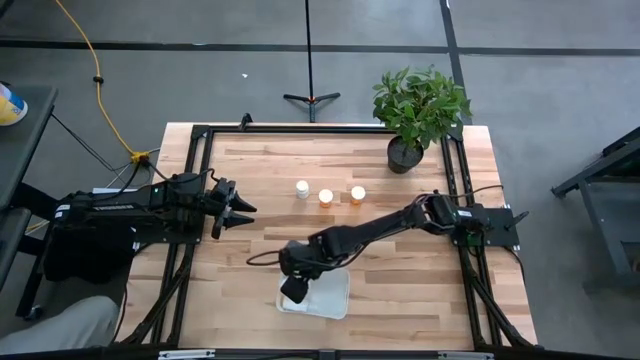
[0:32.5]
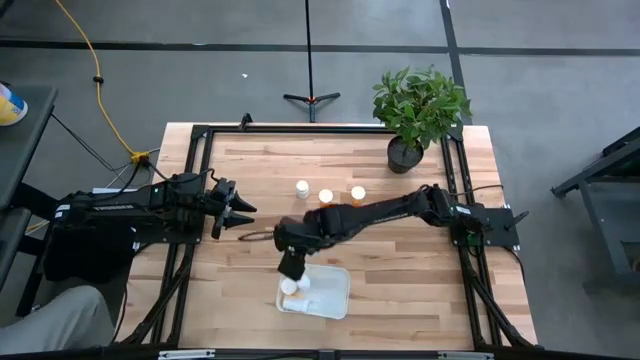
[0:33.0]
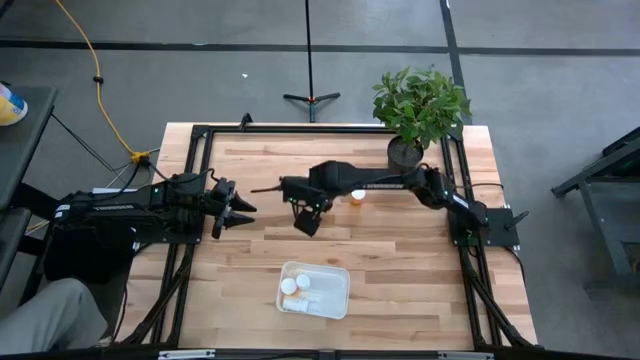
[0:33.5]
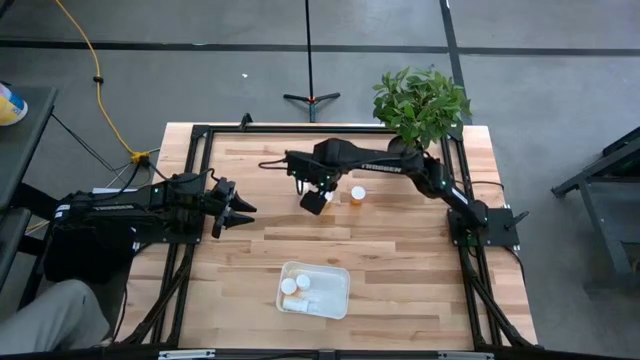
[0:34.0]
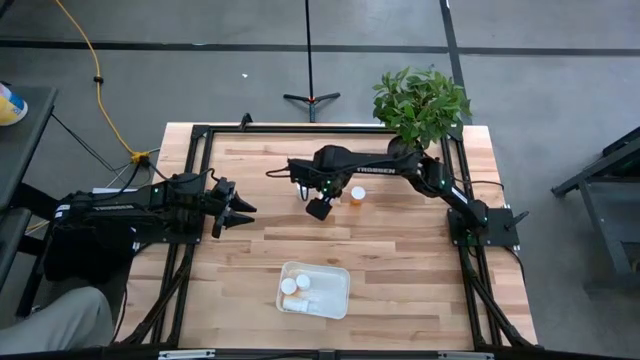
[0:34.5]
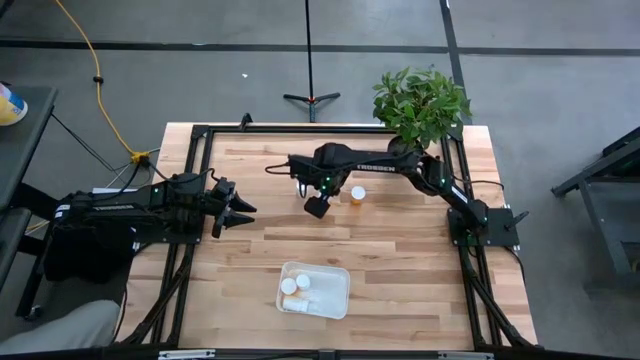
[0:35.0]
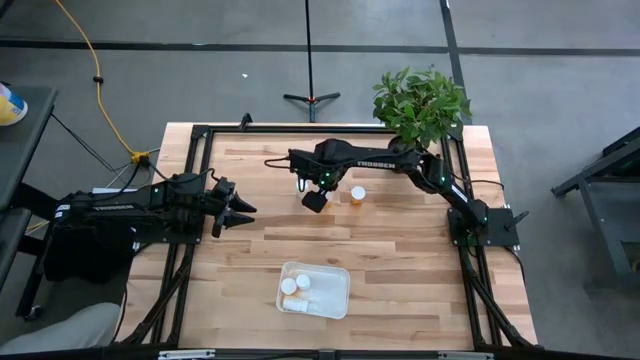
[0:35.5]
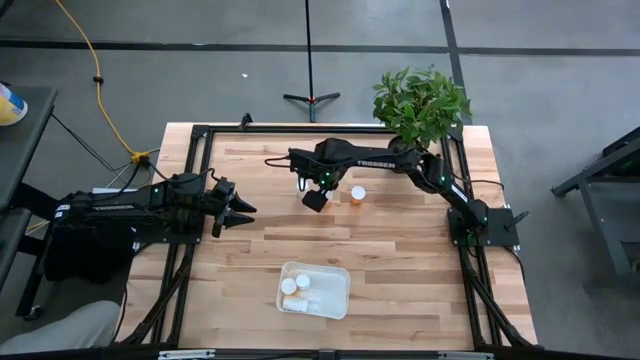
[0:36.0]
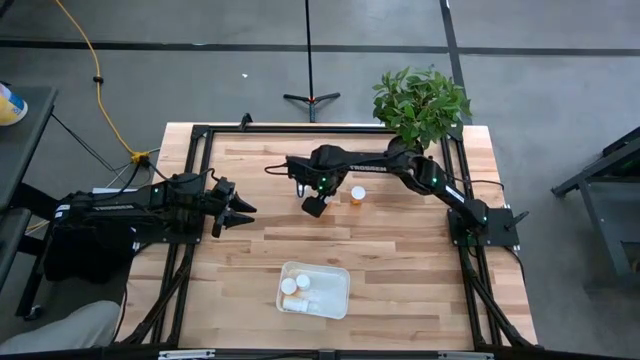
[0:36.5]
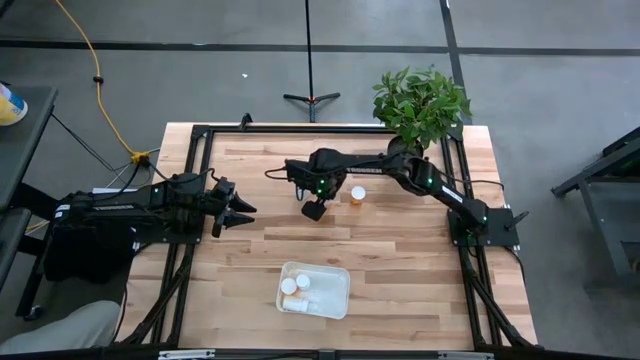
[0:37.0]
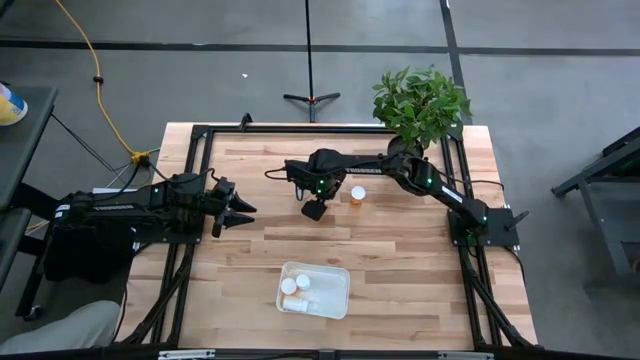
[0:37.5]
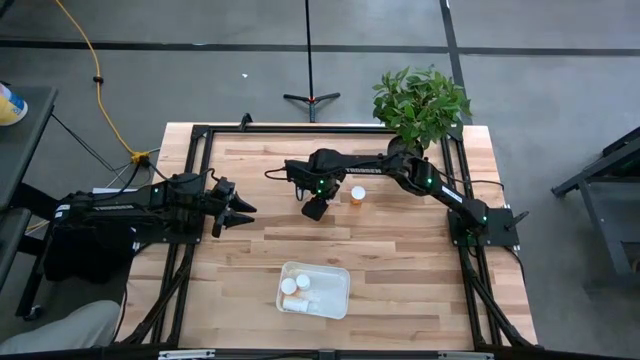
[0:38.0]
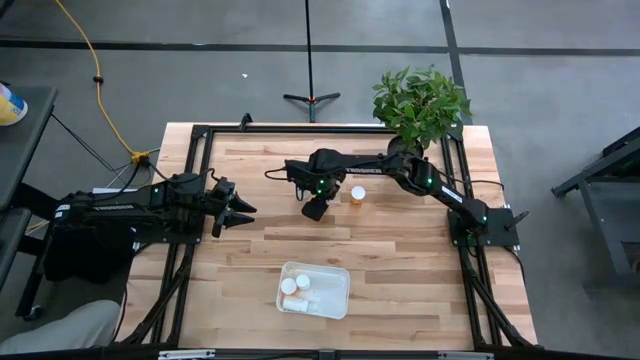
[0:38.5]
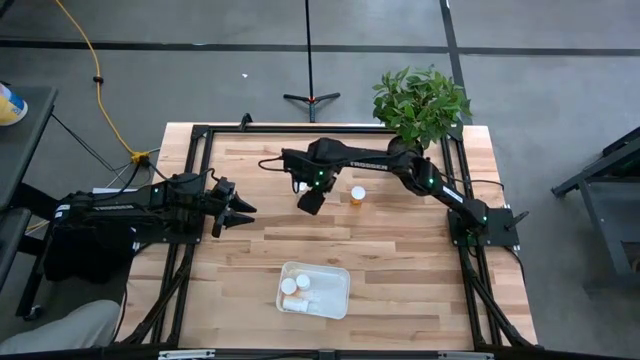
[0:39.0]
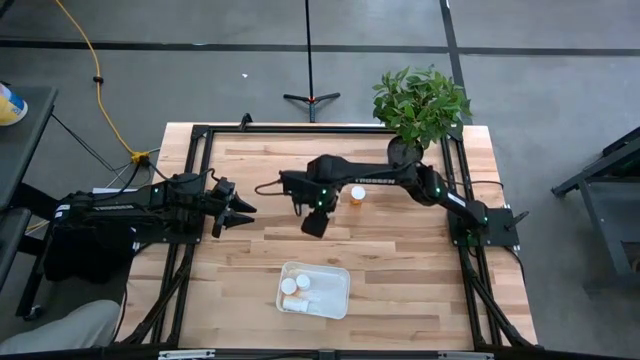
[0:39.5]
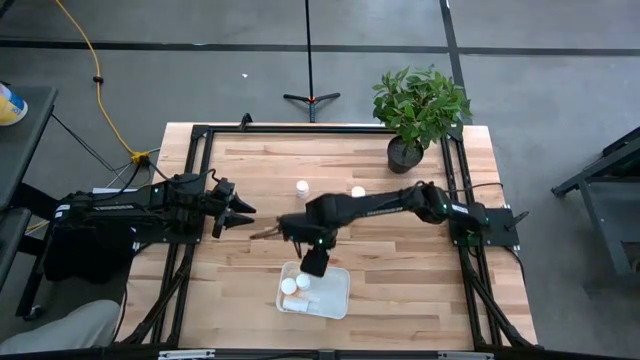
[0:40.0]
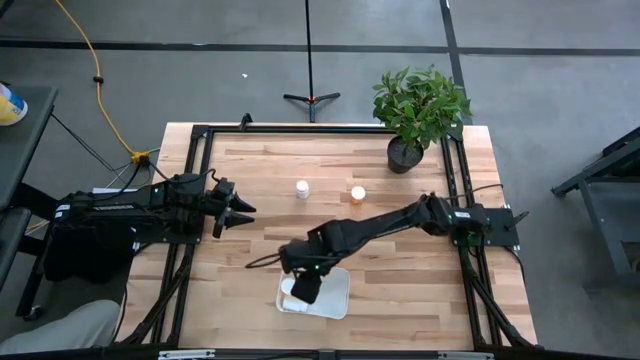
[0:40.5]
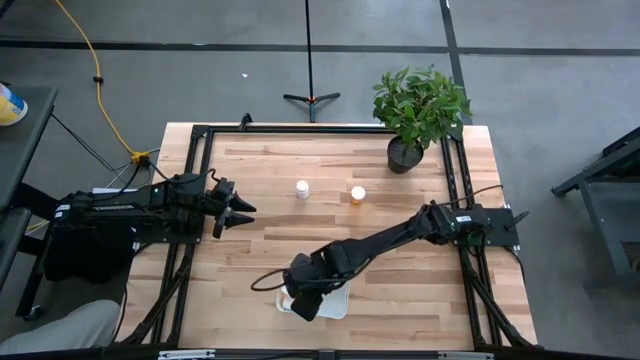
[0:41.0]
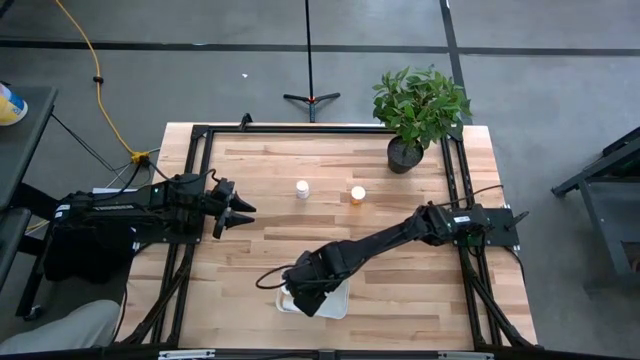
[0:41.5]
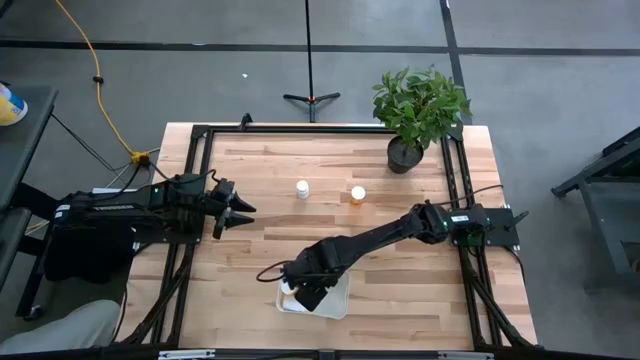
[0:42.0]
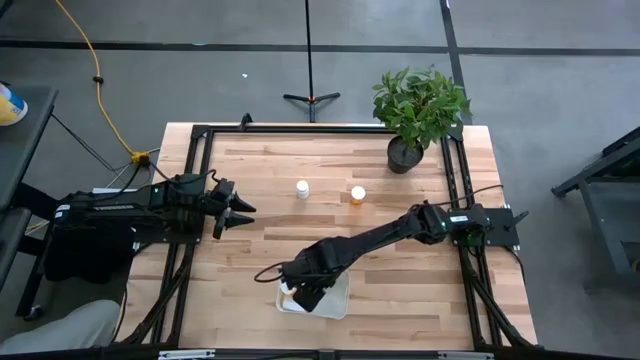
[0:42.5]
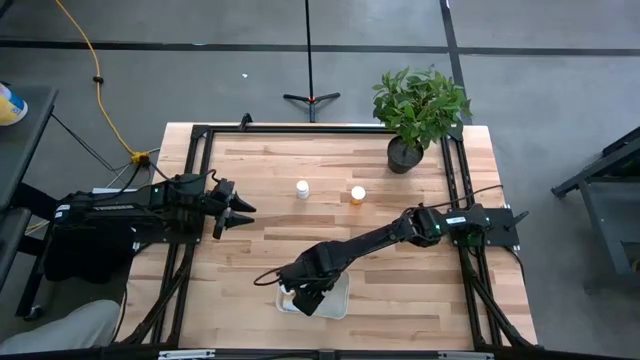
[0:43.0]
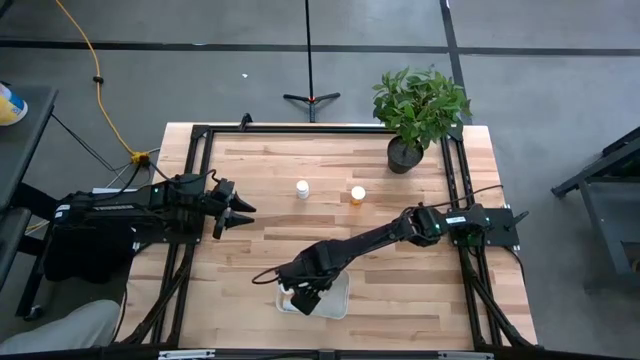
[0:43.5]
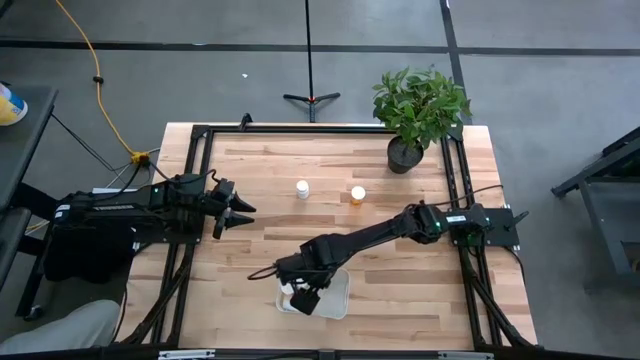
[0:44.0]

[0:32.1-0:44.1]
Task: Pick and place pill bottles into a basket
Put the left orange pill bottle into the white bin

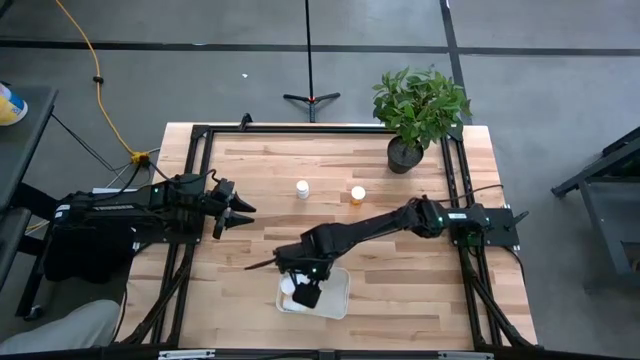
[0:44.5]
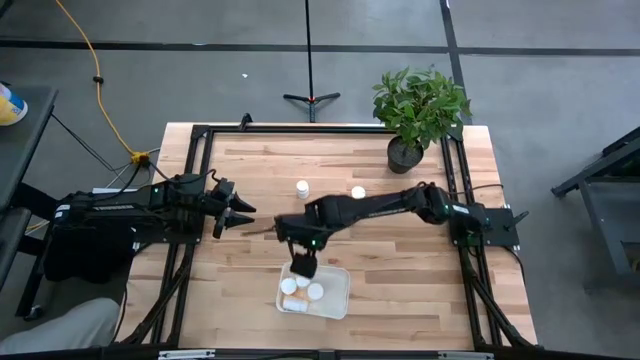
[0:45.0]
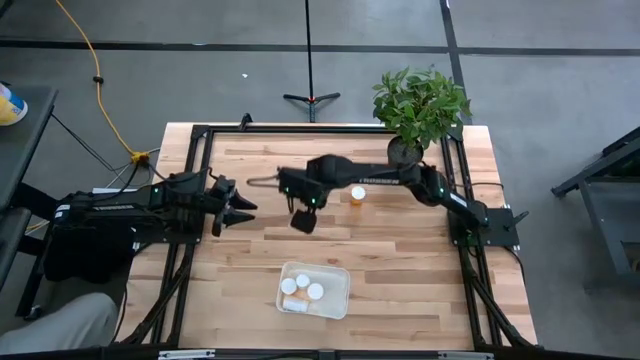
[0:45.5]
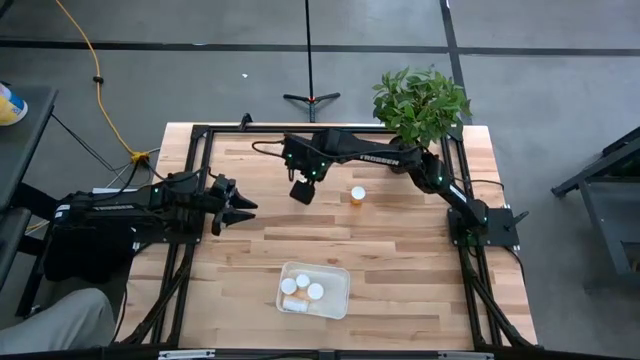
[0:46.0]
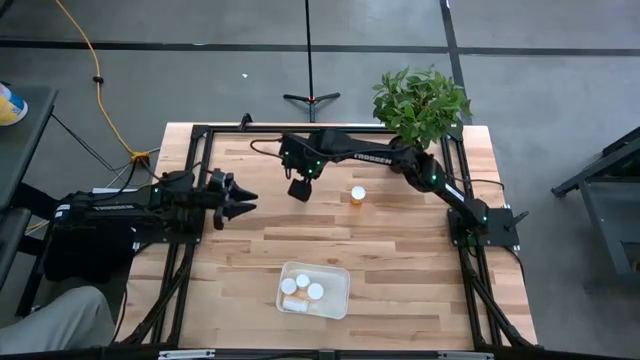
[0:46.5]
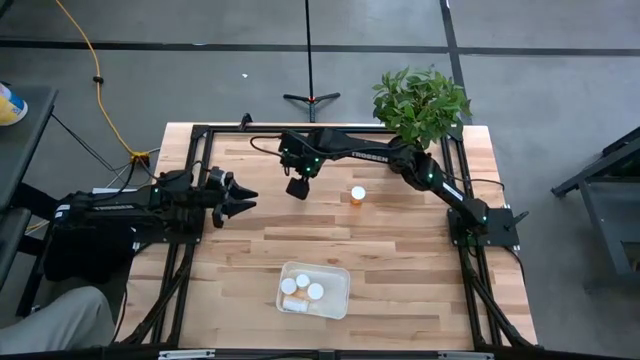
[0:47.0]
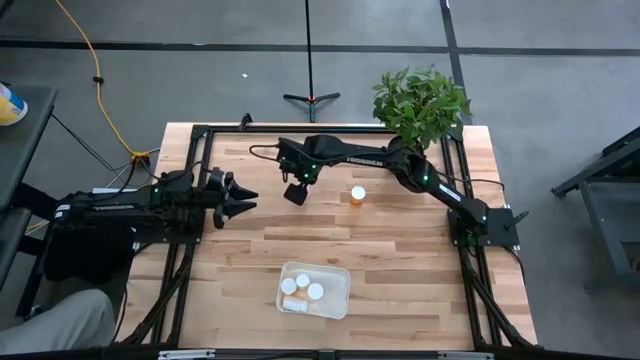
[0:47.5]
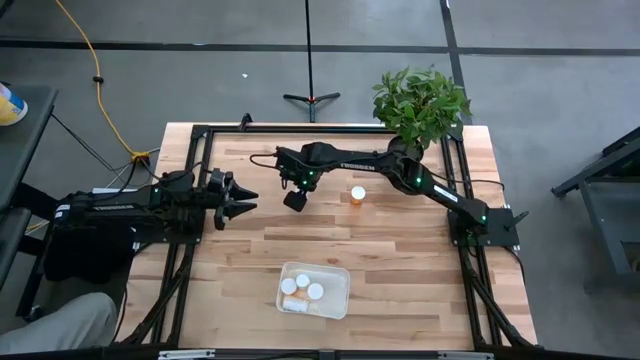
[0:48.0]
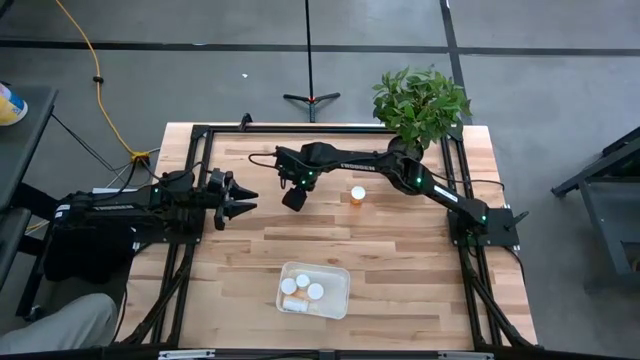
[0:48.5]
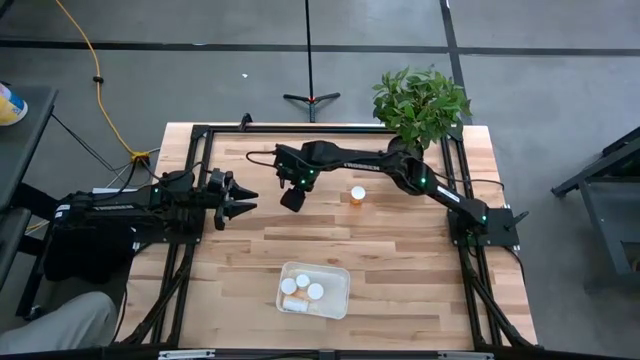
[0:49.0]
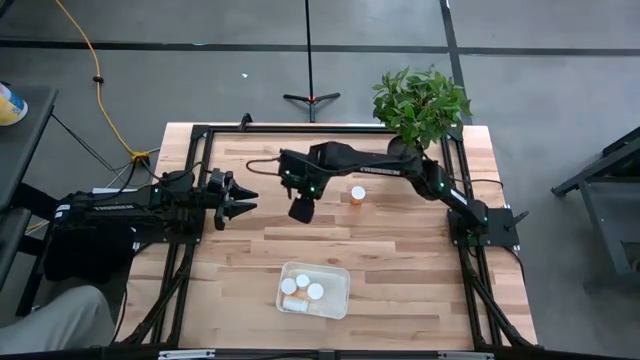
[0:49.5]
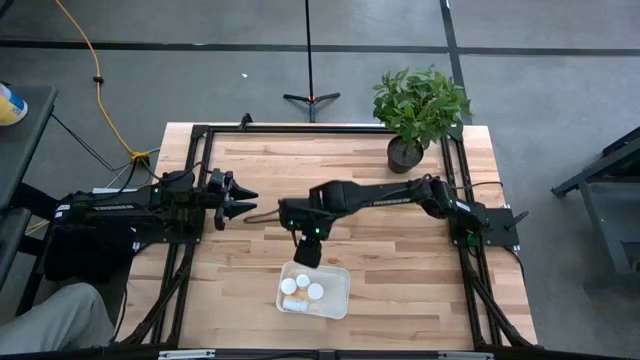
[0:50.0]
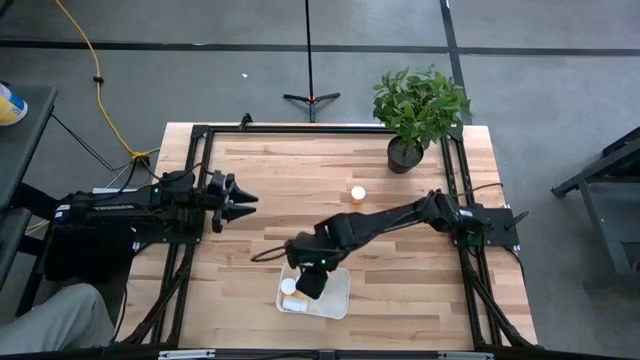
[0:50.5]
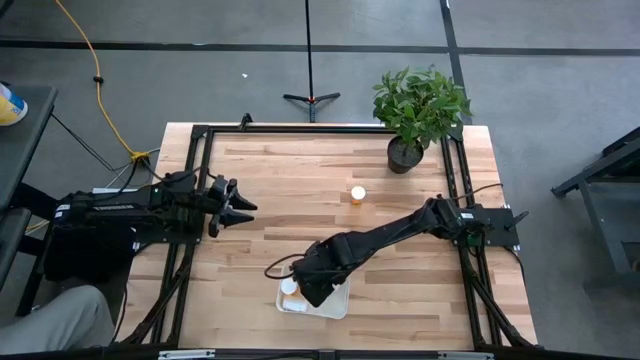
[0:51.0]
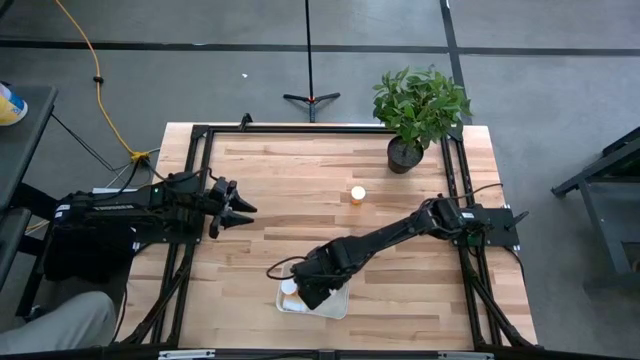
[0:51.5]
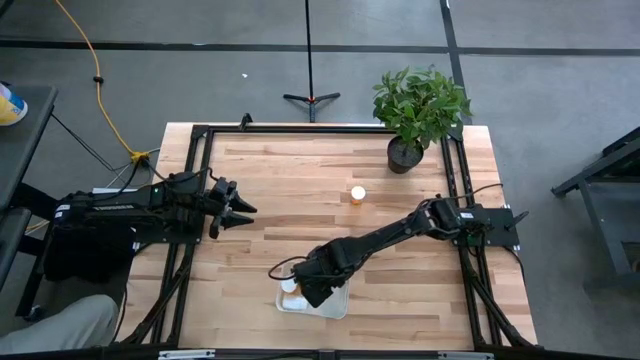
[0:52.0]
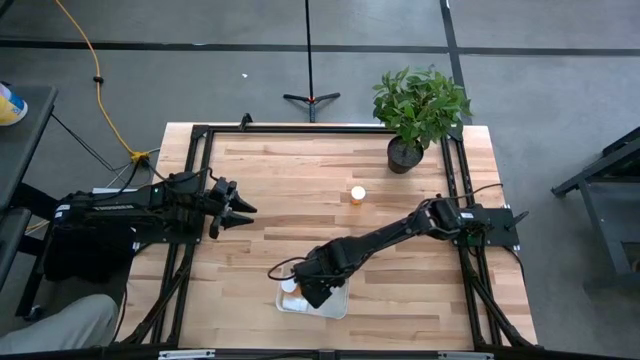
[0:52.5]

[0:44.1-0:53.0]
Put the white pill bottle into the white bin
